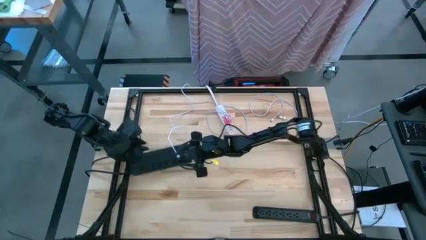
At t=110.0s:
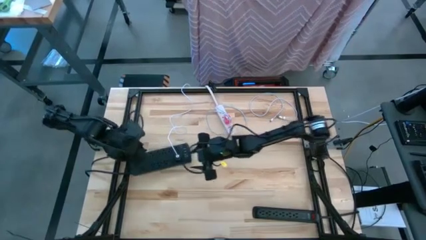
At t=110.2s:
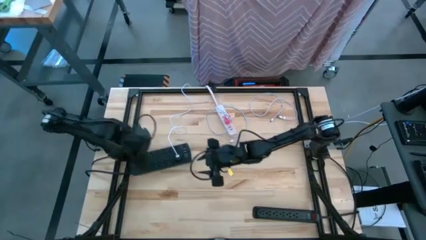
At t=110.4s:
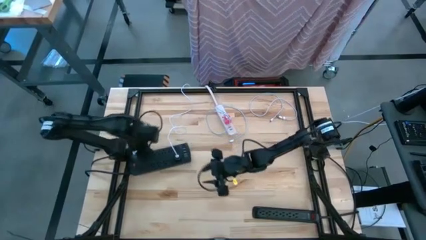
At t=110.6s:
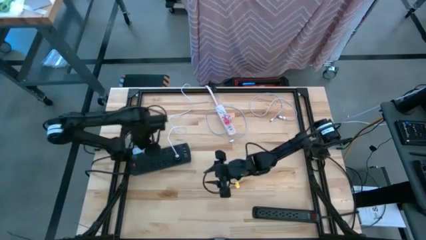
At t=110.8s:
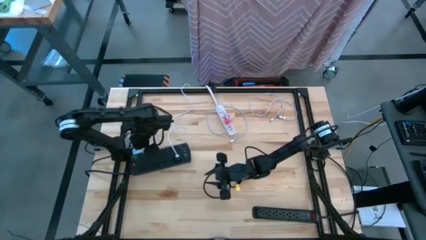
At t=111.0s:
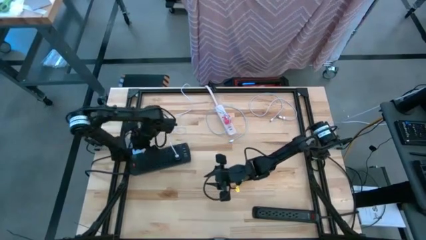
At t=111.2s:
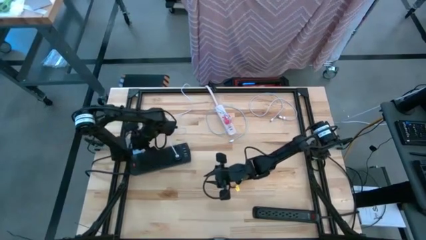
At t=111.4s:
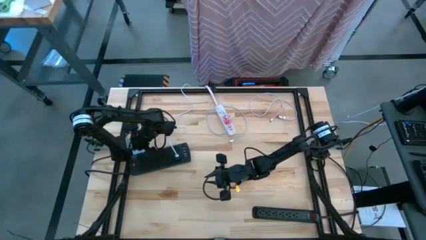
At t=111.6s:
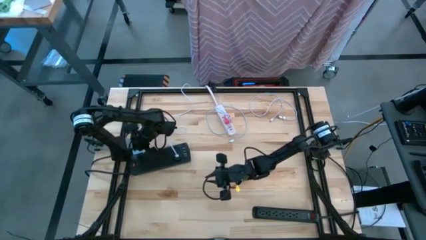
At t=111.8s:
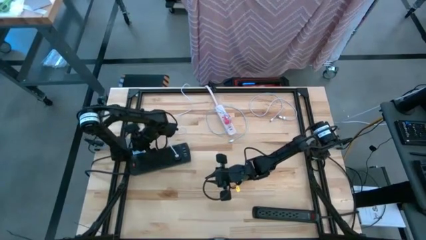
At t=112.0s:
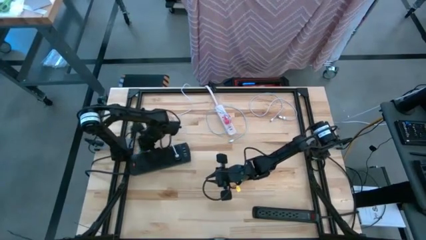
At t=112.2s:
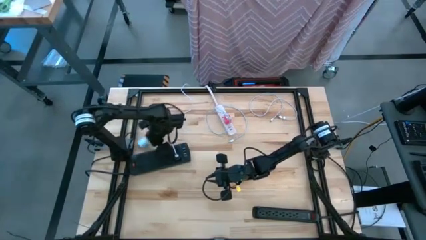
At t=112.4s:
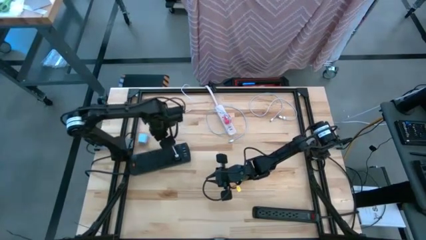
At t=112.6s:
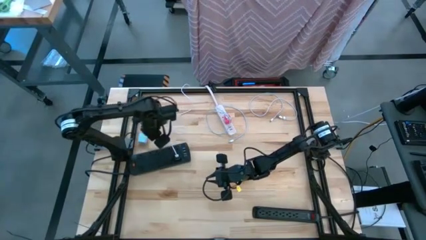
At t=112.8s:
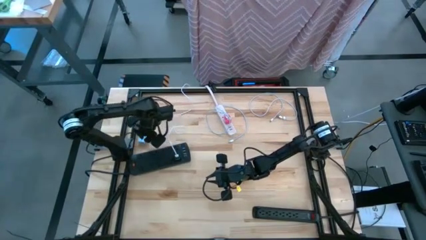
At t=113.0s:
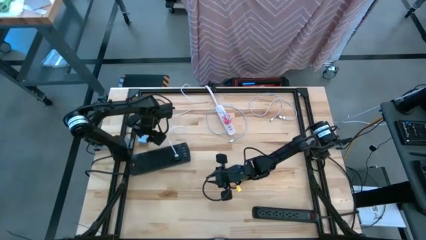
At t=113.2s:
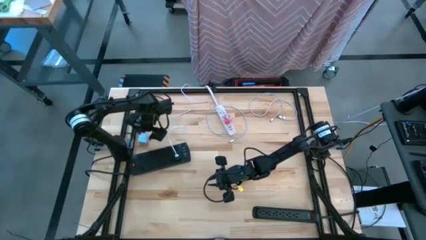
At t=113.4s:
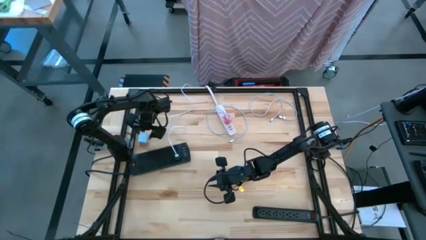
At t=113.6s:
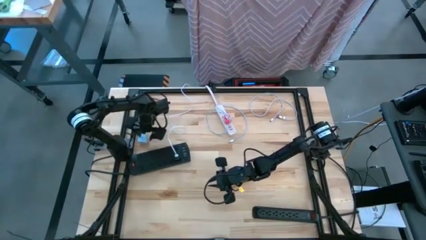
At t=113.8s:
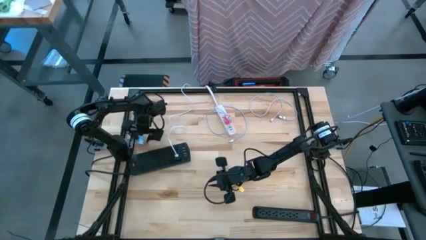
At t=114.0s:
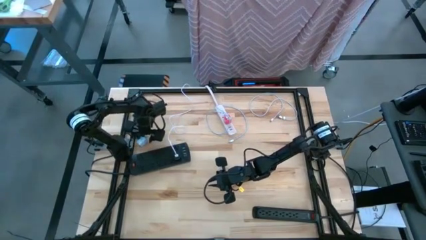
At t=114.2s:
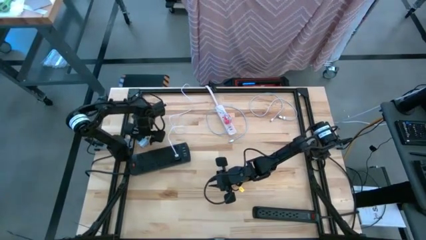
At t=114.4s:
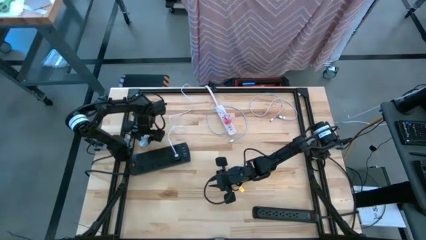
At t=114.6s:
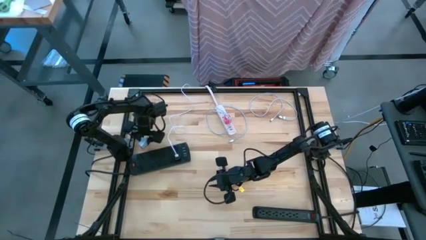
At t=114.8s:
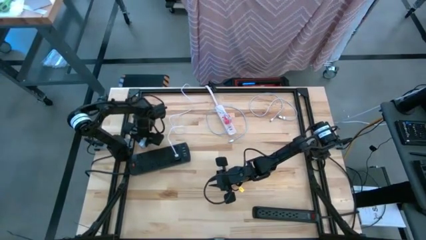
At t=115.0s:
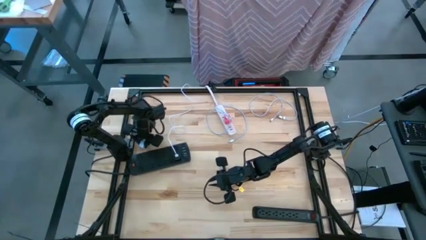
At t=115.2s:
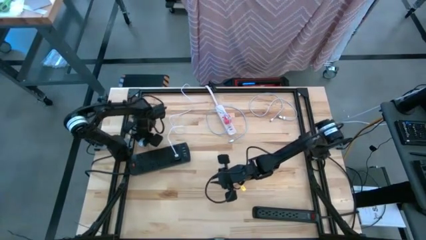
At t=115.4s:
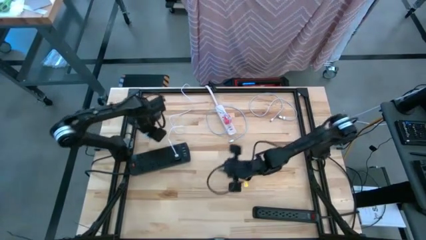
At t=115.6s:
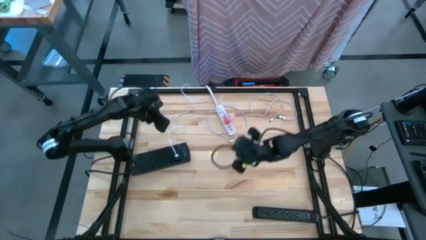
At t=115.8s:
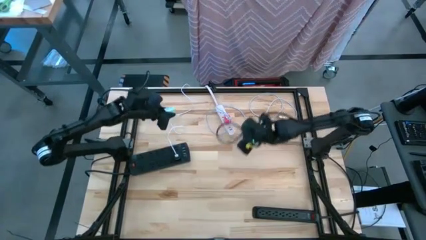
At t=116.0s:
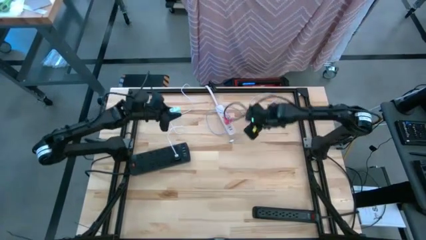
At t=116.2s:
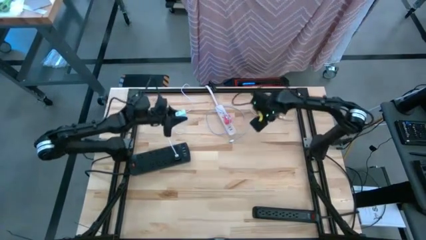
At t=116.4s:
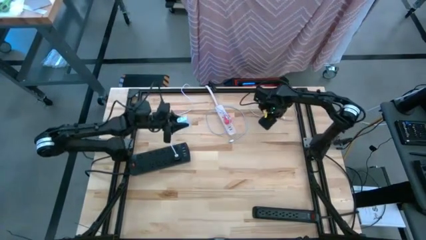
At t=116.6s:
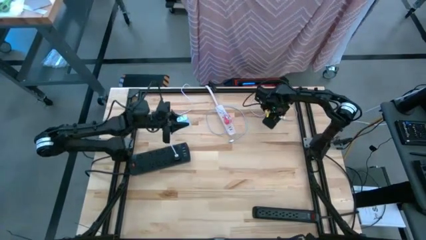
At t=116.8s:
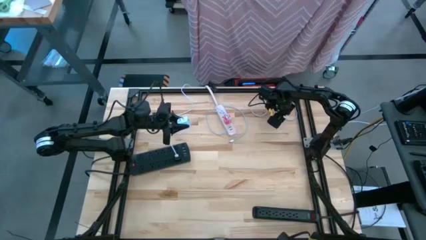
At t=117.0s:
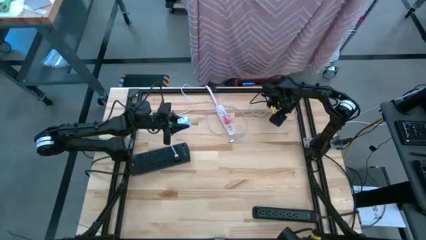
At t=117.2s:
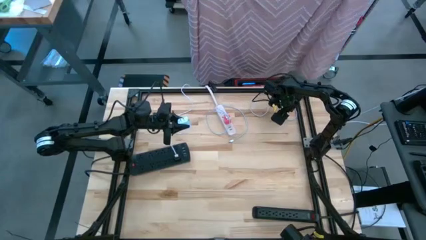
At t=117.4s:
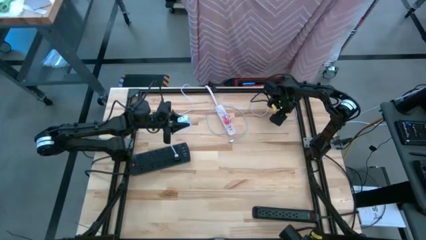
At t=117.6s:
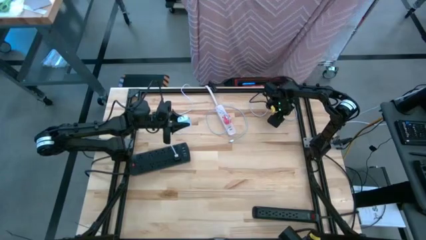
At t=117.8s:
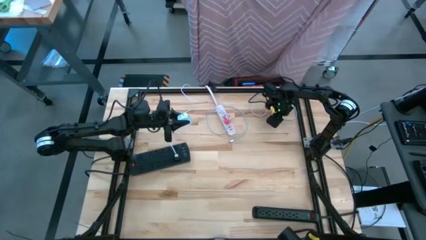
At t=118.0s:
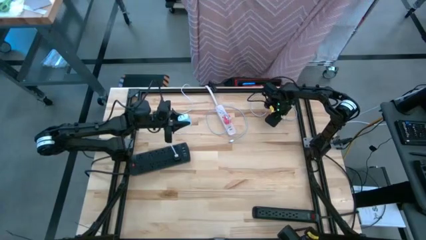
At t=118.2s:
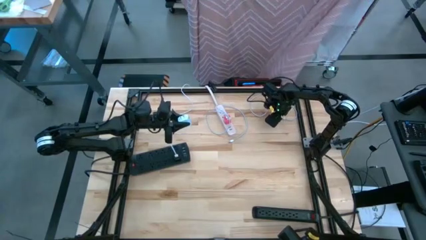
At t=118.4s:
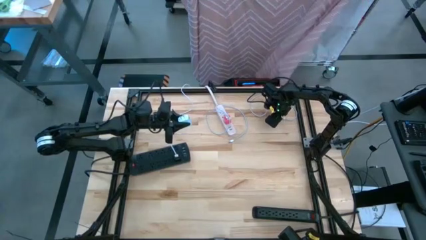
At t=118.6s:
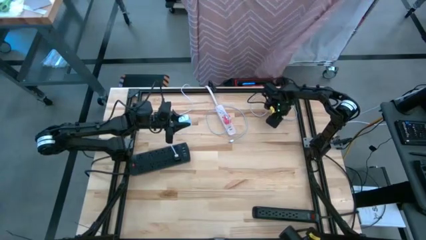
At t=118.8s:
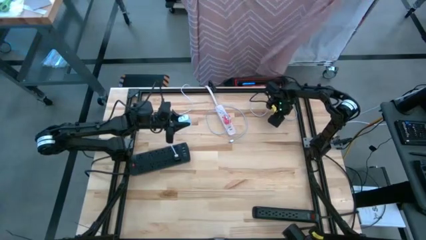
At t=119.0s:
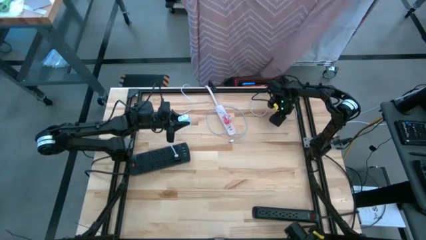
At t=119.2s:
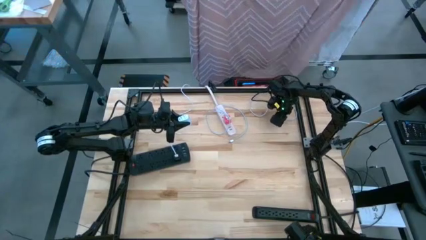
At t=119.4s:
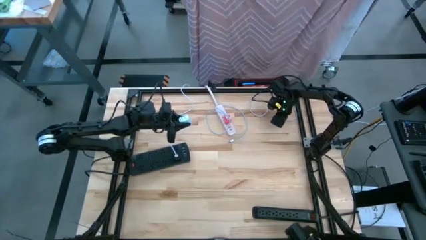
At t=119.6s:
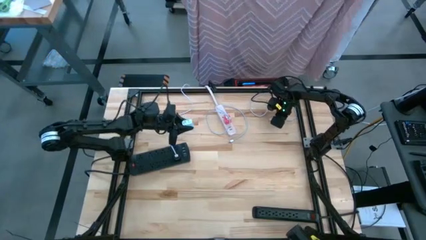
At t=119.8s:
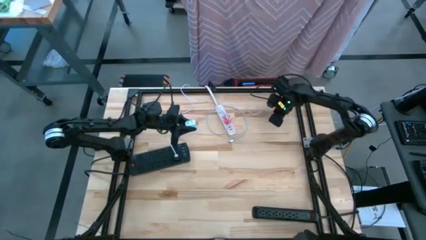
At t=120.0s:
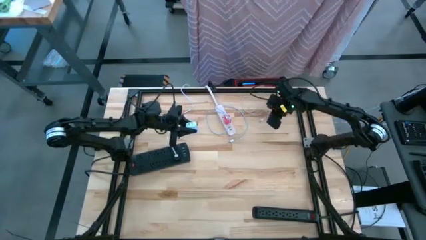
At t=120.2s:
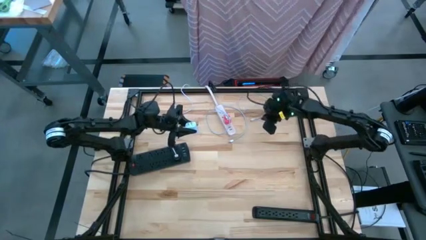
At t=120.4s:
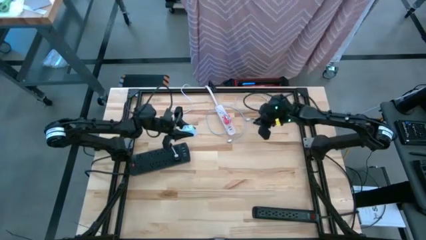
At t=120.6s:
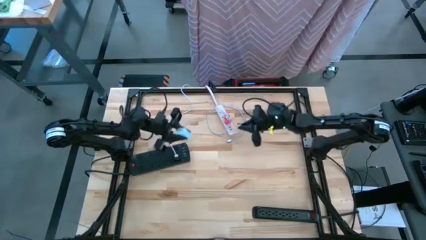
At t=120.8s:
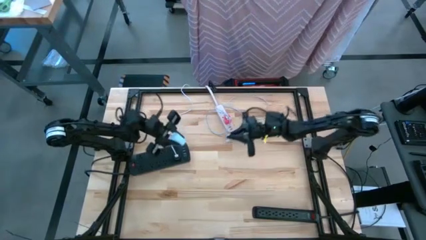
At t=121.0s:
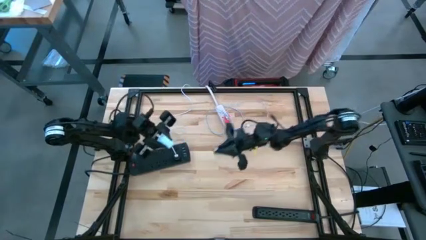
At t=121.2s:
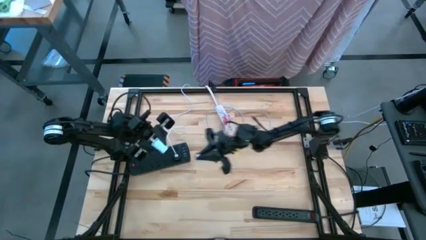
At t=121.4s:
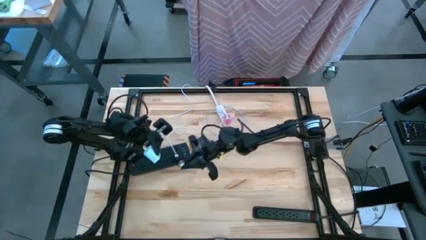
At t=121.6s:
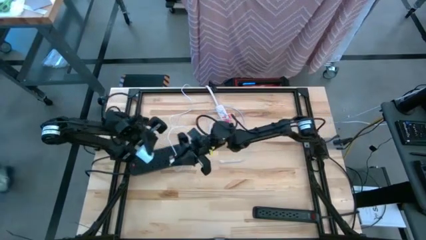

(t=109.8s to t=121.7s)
Task: Insert USB
Insert the white charger cable to the white charger adapter

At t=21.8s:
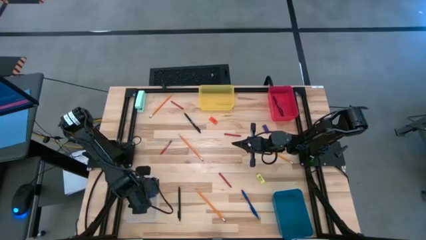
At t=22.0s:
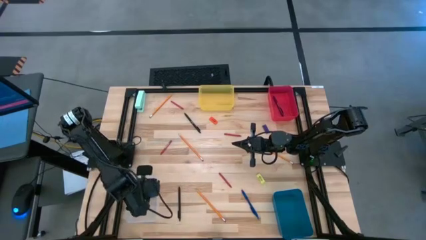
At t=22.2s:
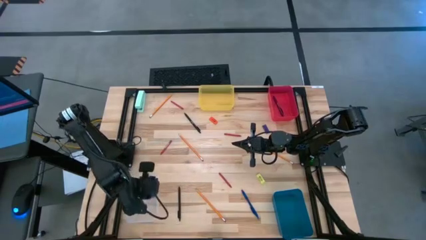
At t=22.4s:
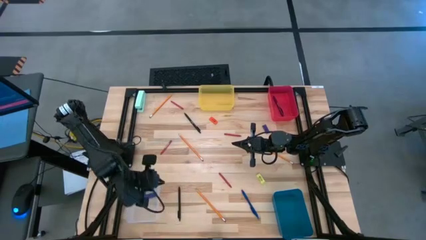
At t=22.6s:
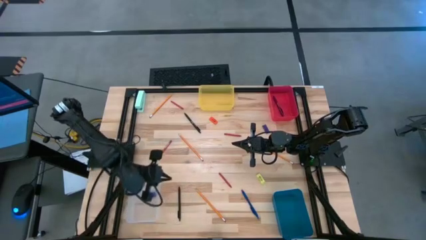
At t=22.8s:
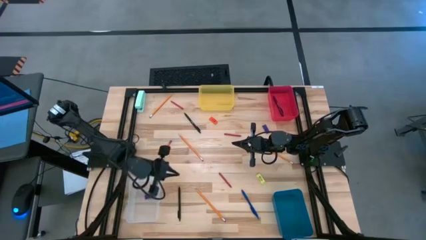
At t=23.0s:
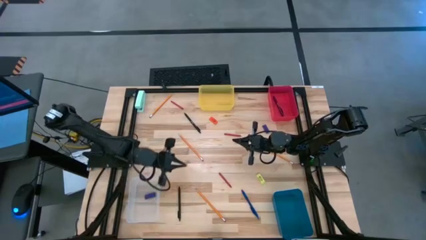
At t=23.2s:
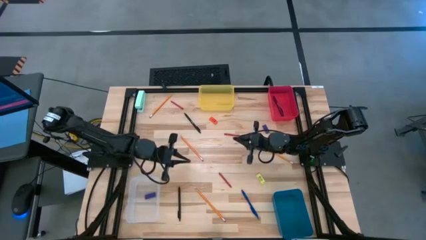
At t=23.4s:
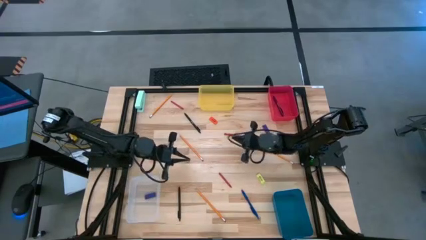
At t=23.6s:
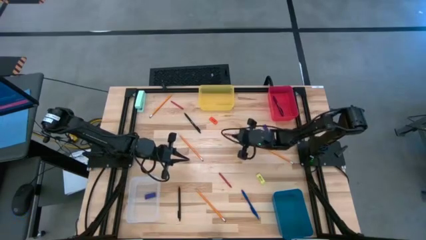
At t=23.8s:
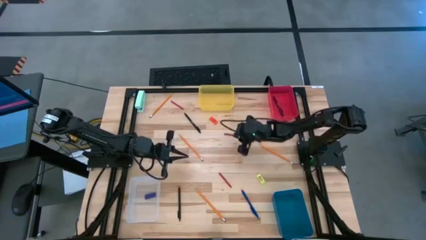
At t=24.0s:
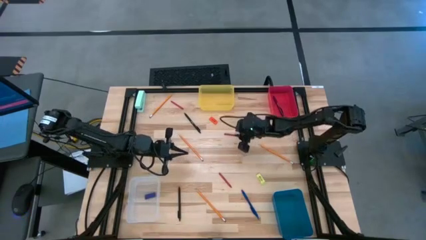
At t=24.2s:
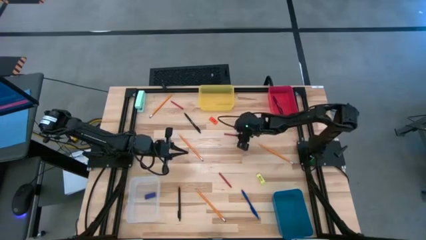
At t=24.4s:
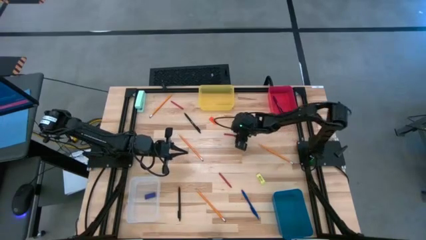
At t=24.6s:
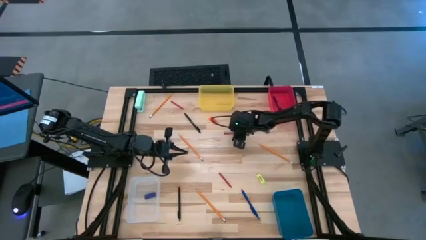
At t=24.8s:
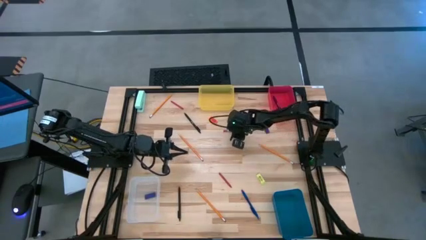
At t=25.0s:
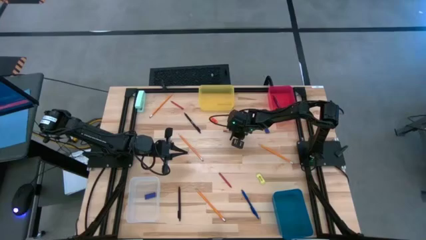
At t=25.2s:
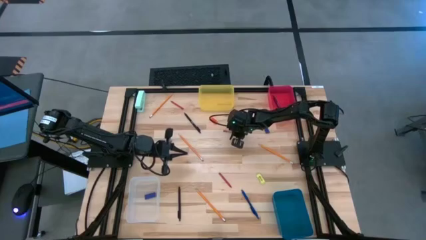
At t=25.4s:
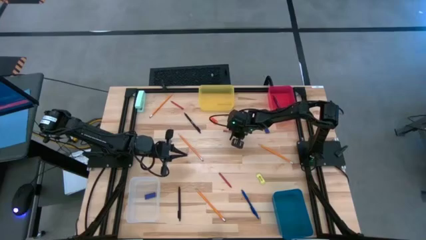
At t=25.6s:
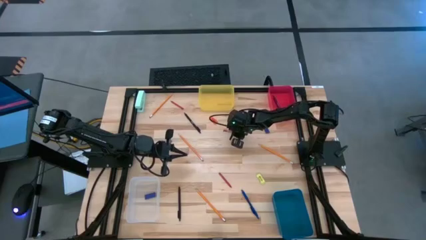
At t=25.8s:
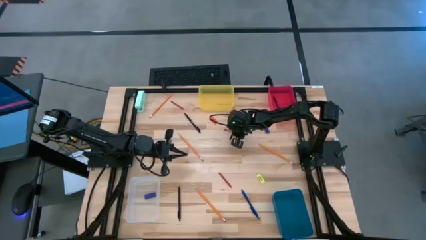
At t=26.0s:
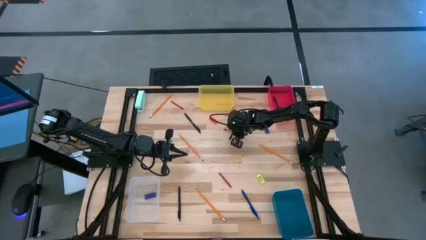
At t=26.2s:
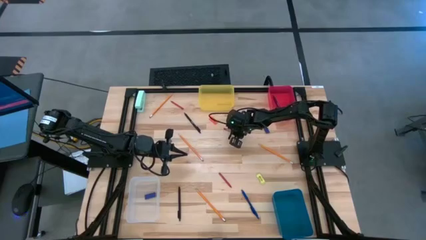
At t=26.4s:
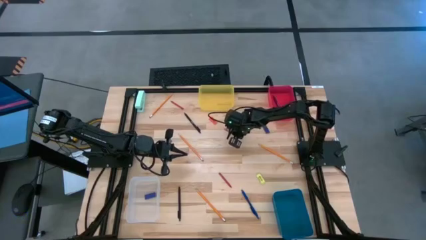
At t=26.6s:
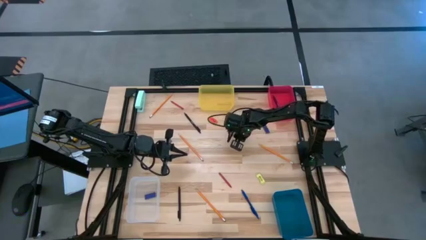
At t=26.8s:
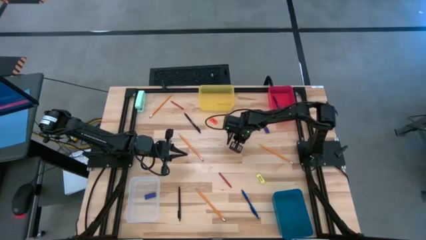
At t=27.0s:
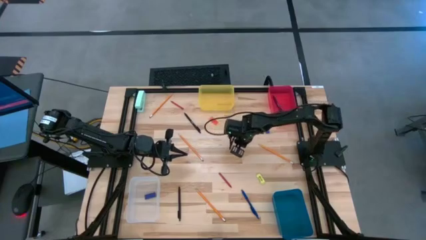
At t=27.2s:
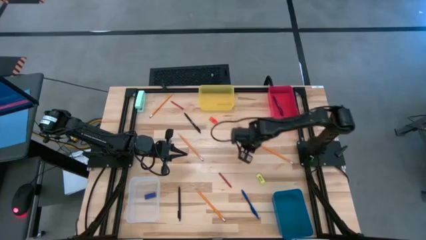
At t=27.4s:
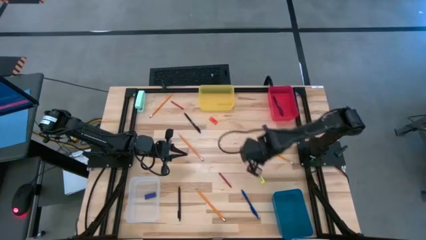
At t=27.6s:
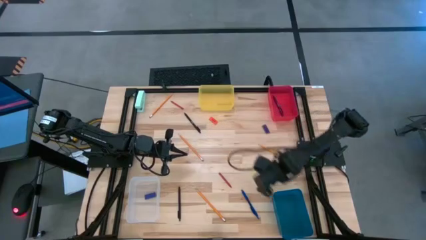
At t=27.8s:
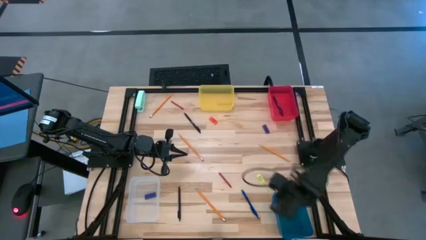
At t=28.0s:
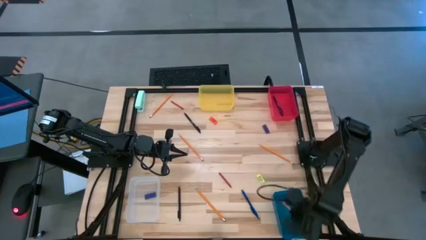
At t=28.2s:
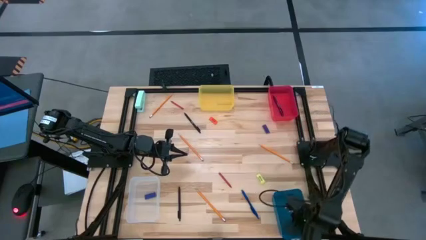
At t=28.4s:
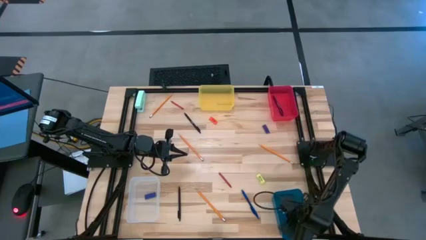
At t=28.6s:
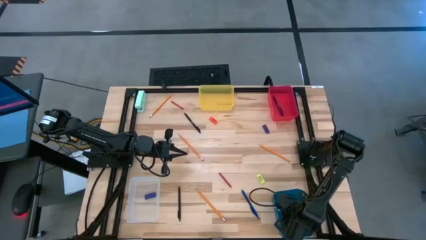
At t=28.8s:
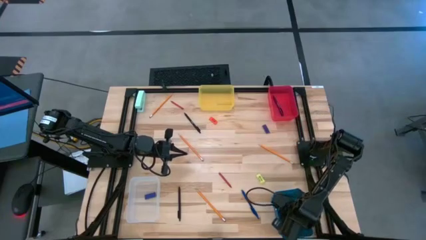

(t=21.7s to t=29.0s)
Task: Sort crayons/erasers/pens/pencils in bins
Put the red crayon into the blue bin
